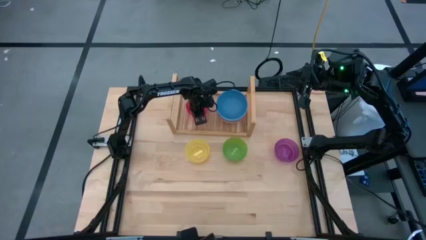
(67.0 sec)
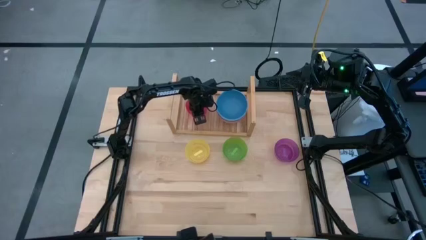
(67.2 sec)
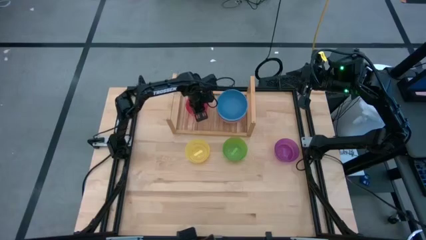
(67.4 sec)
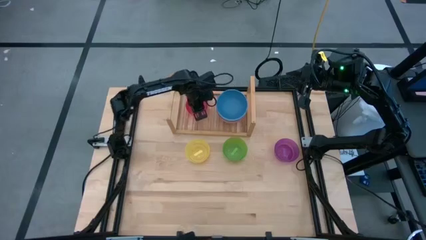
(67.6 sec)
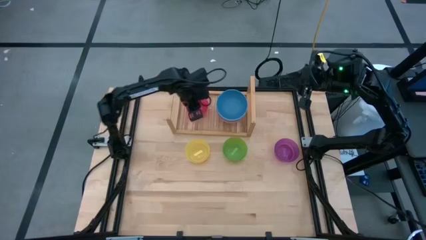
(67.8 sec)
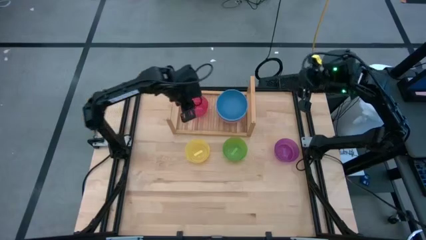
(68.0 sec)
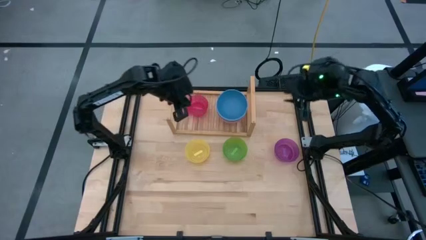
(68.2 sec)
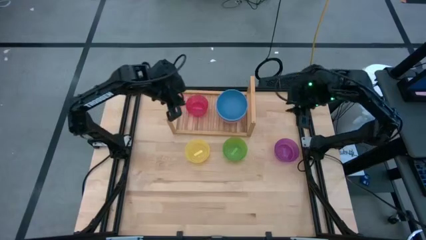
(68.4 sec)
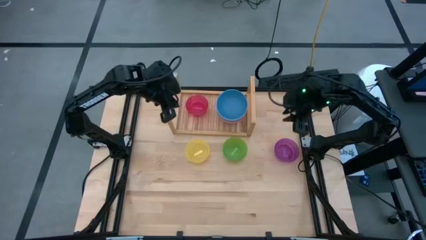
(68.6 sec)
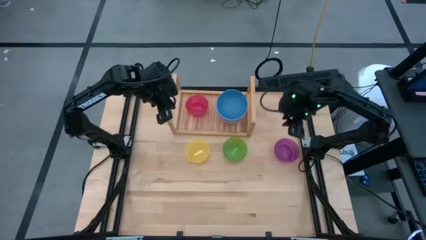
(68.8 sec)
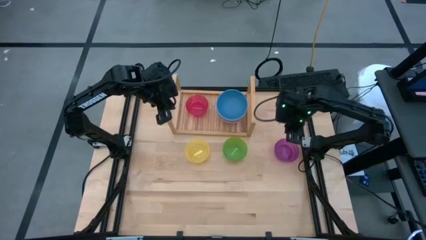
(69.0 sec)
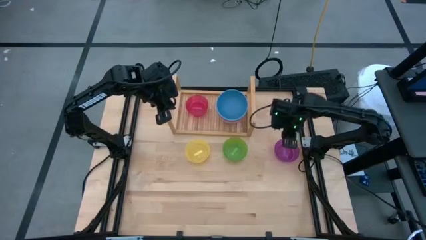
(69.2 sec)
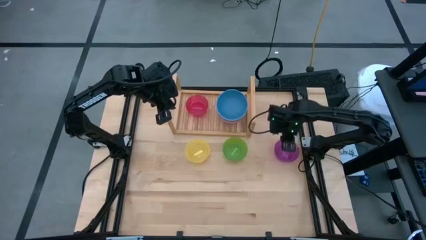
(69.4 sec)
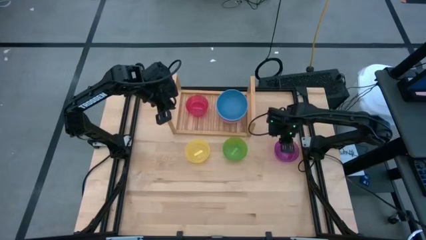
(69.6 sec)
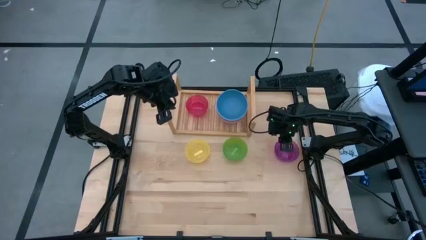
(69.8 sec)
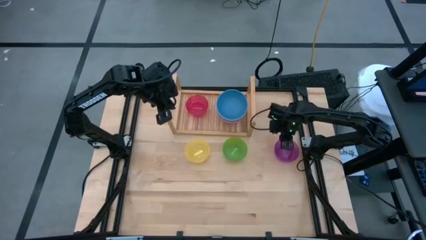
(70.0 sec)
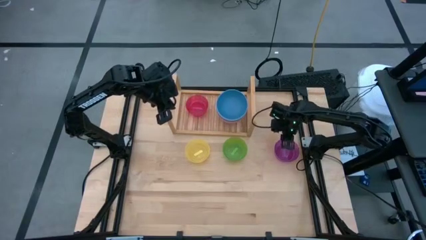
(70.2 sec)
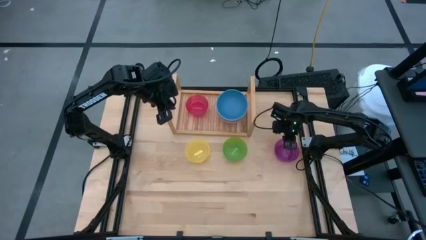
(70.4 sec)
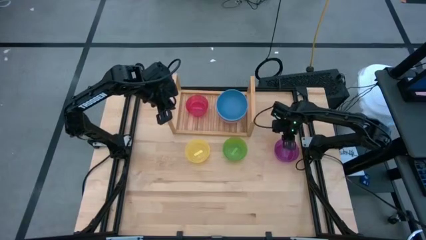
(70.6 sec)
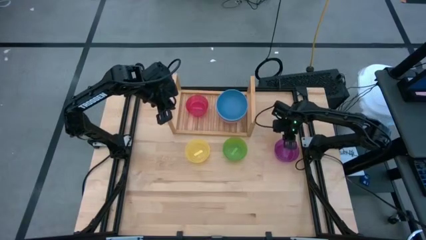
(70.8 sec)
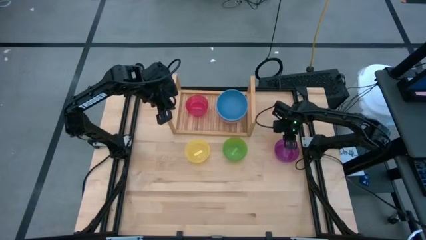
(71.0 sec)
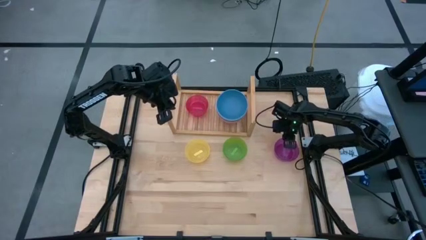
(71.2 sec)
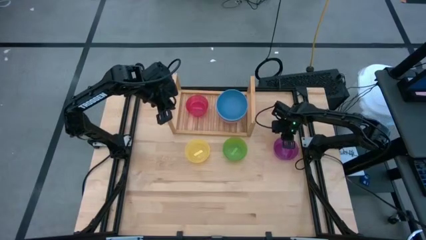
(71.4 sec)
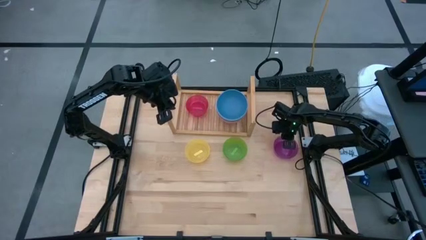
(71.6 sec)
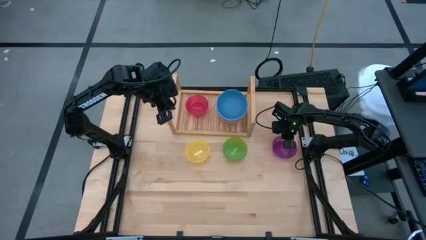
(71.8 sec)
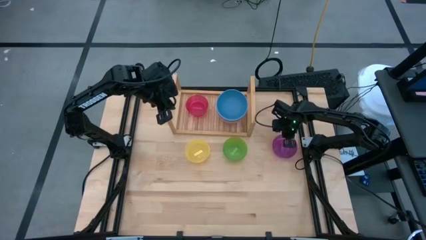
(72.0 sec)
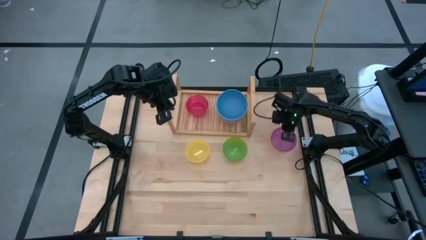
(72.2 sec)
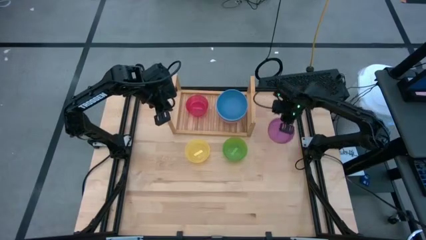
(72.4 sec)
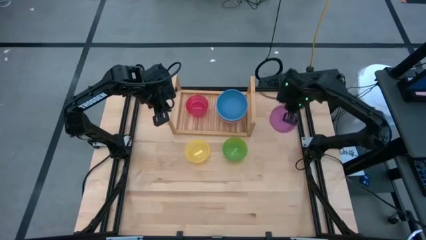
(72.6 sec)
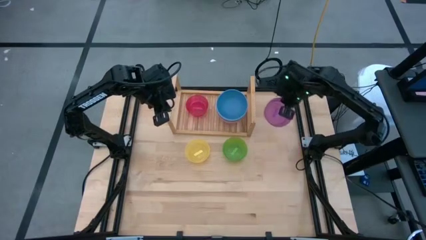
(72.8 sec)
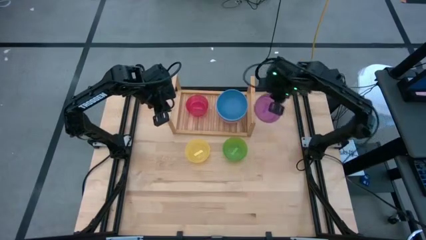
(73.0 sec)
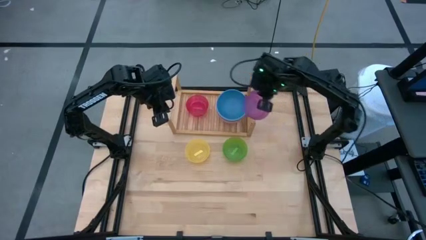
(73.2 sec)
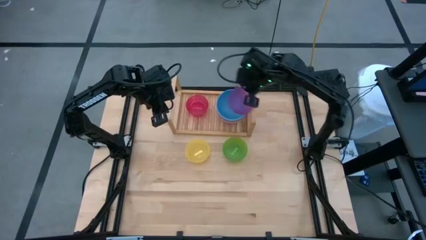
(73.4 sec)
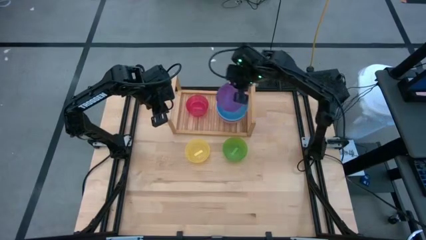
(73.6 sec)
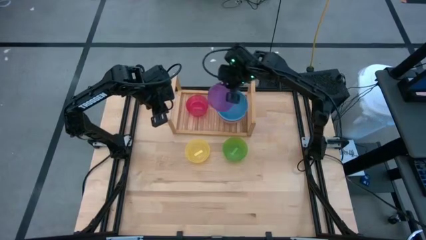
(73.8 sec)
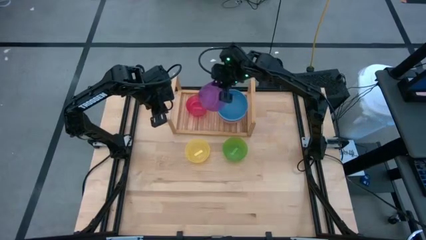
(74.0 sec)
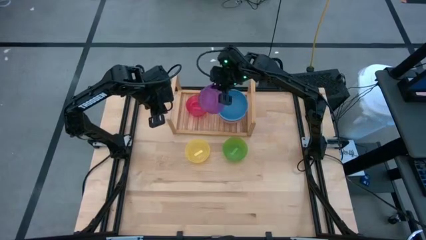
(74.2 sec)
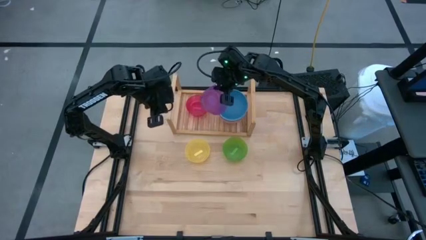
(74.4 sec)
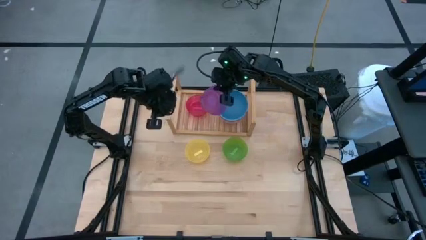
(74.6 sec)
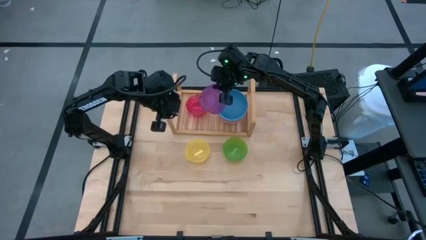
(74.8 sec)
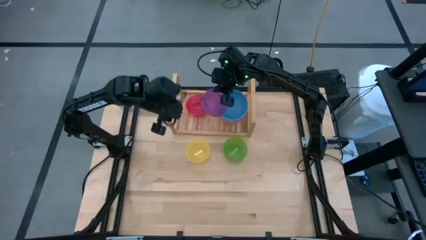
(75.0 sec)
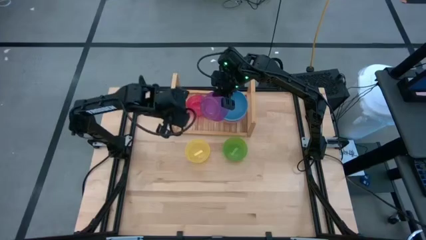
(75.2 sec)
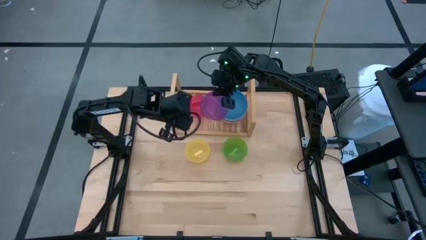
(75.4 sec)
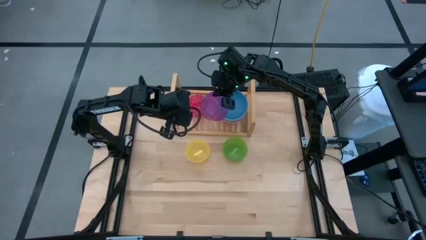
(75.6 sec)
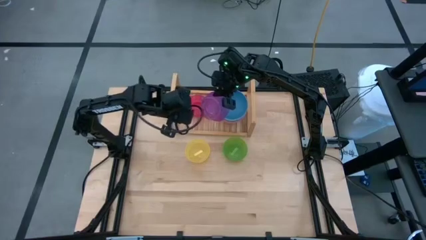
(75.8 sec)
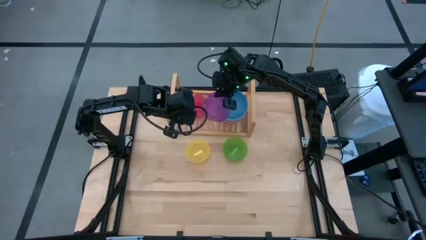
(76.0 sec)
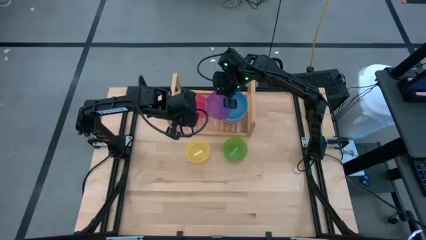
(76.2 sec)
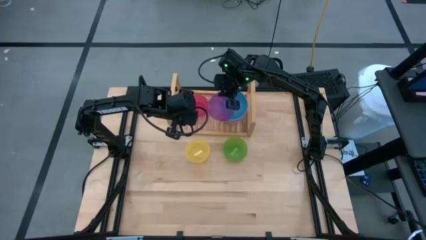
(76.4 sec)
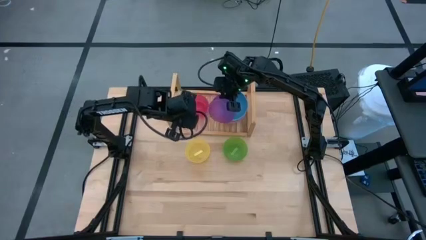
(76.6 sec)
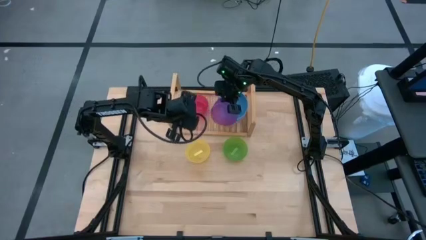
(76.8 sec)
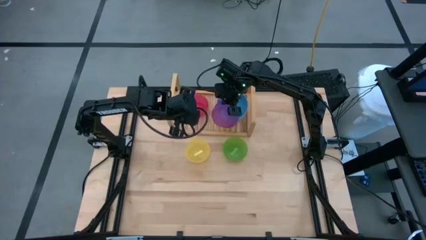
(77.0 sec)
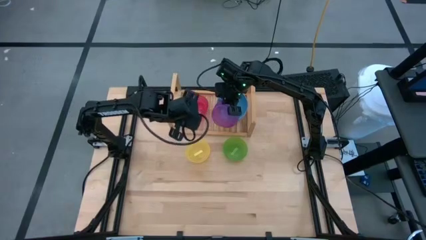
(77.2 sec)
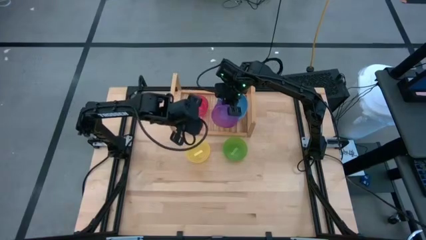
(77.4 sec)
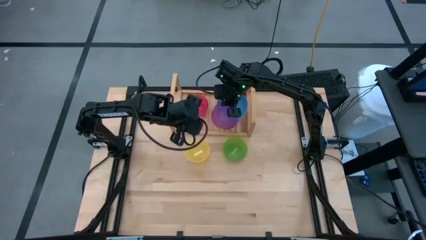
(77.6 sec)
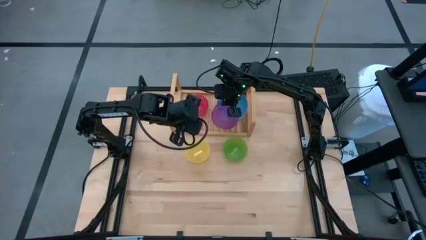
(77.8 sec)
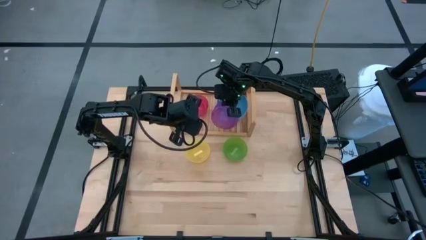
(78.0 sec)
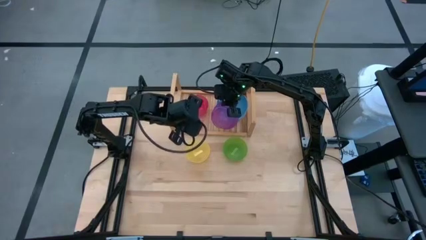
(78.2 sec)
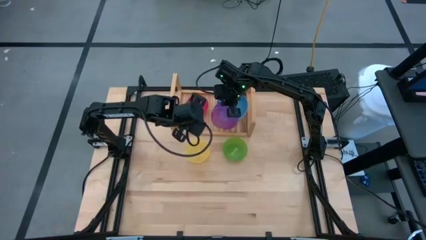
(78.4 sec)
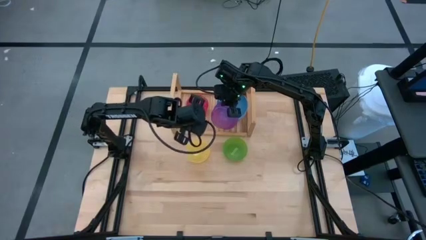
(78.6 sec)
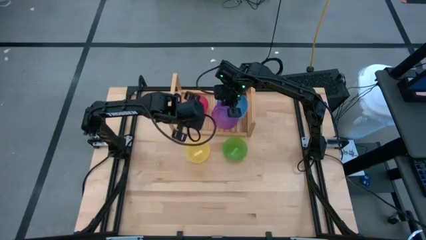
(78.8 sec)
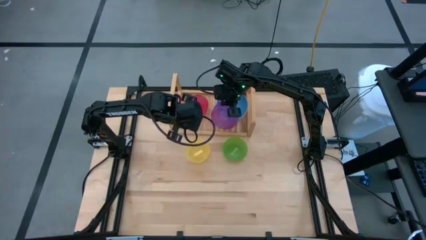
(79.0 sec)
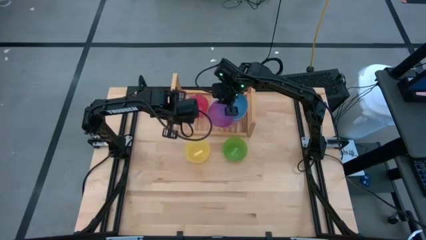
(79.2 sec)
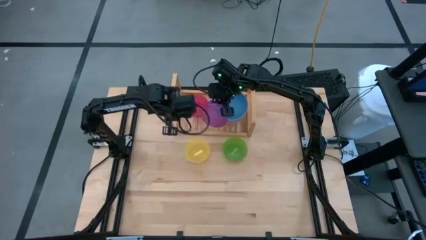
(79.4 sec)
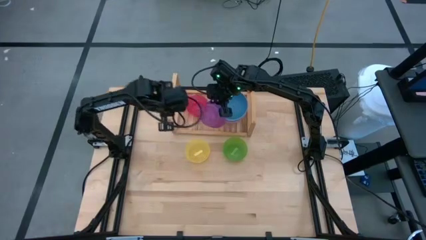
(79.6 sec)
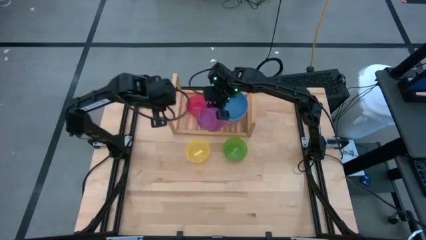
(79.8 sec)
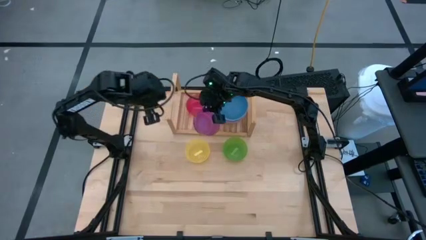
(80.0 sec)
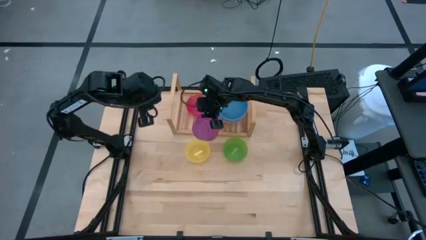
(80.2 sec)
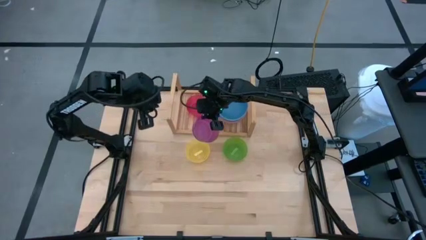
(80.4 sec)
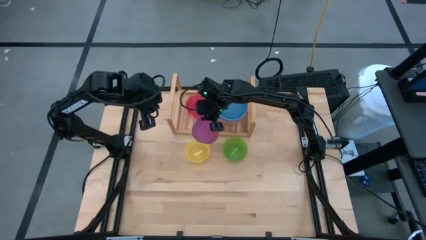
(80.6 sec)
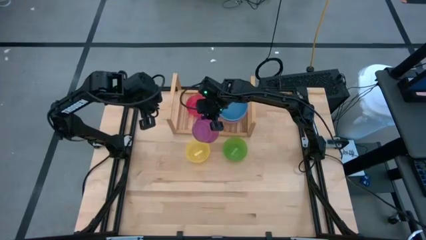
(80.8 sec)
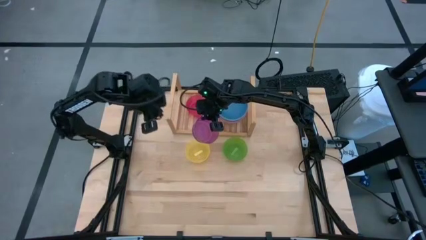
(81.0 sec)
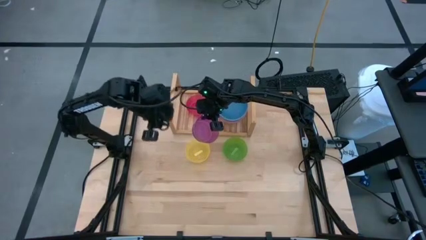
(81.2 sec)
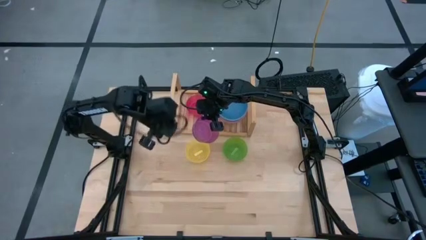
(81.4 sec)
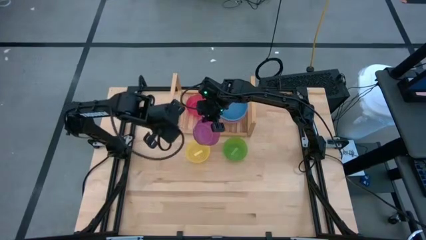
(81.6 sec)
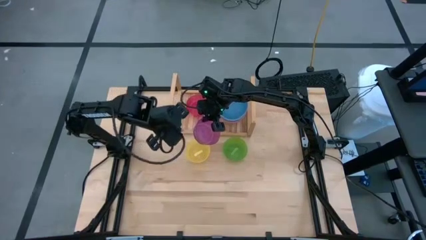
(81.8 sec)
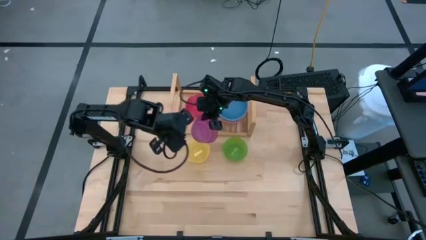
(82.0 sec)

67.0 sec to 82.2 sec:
Task: Place and stack bowls onto a shelf
Stack the violet bowl into the red bowl on the shelf
